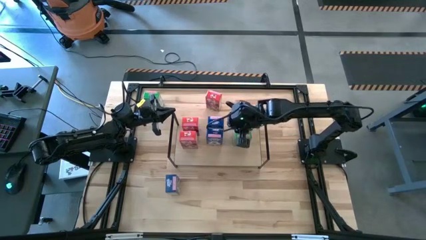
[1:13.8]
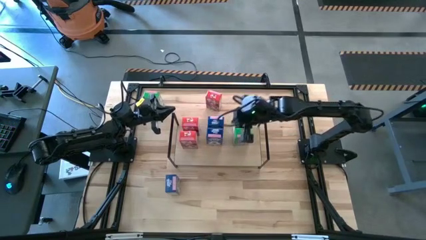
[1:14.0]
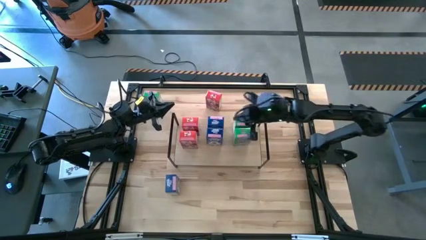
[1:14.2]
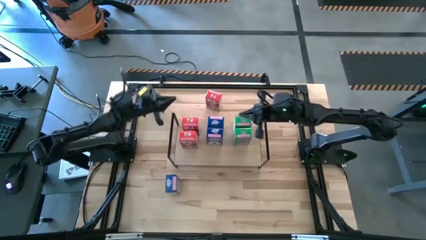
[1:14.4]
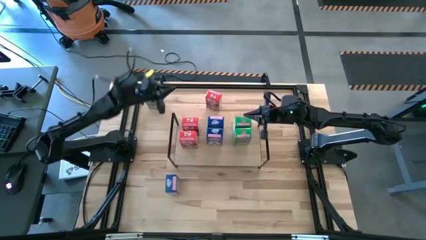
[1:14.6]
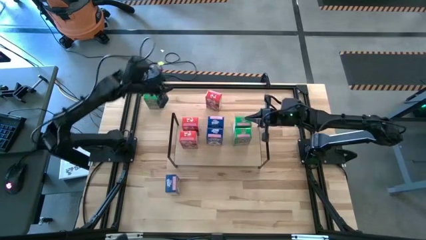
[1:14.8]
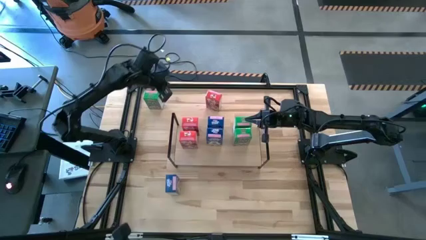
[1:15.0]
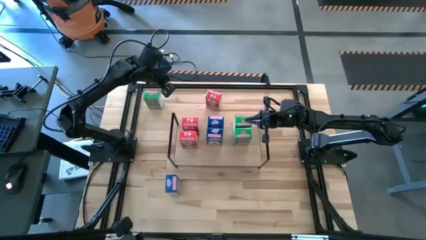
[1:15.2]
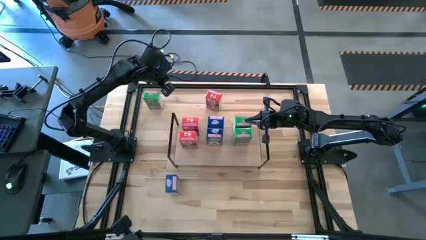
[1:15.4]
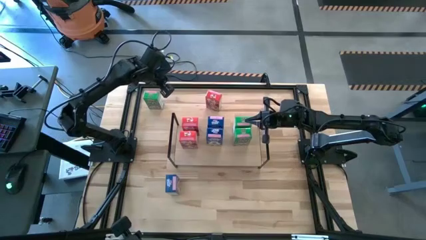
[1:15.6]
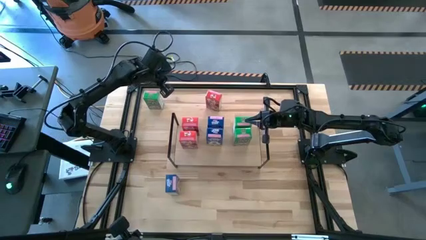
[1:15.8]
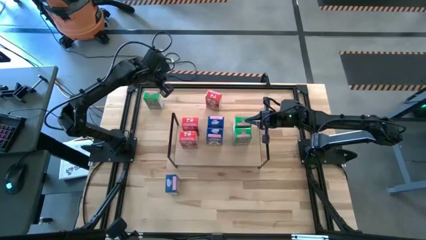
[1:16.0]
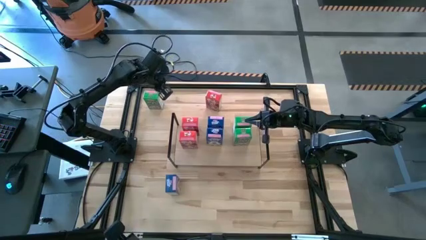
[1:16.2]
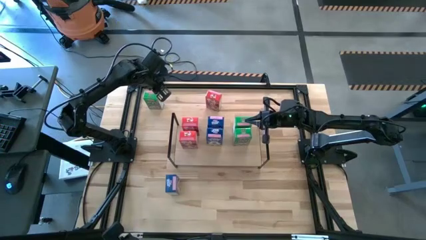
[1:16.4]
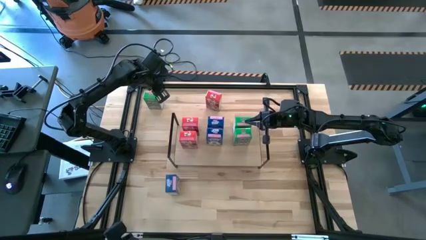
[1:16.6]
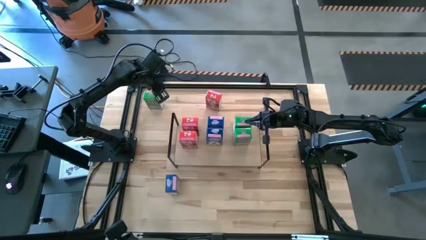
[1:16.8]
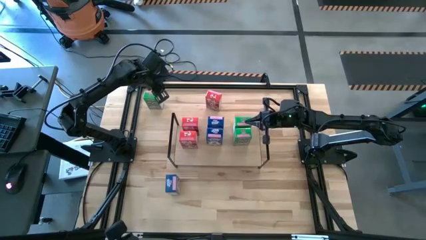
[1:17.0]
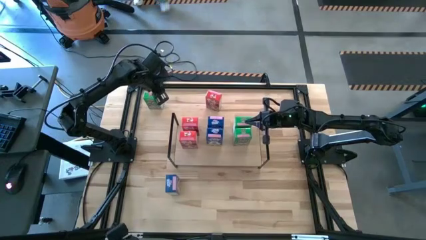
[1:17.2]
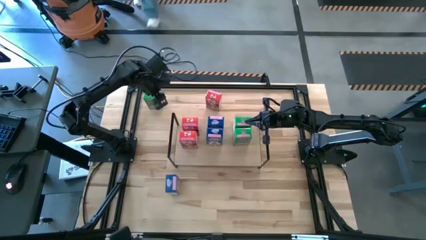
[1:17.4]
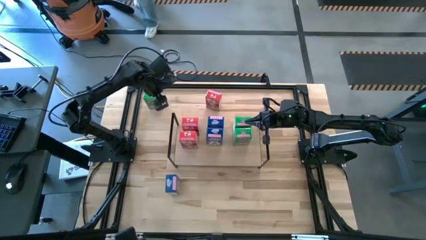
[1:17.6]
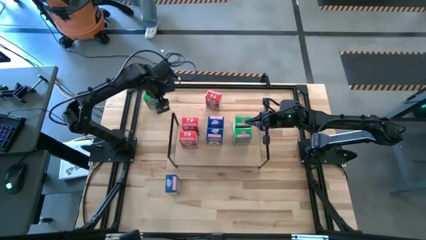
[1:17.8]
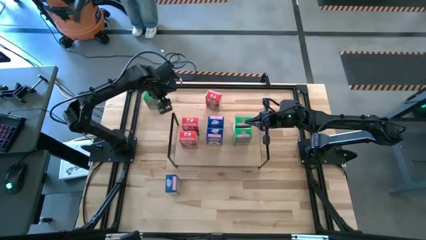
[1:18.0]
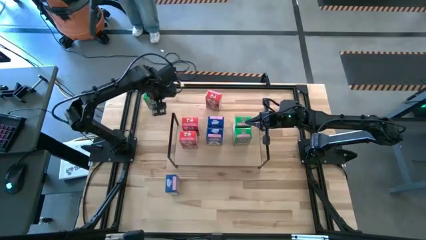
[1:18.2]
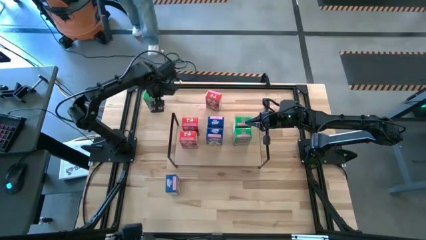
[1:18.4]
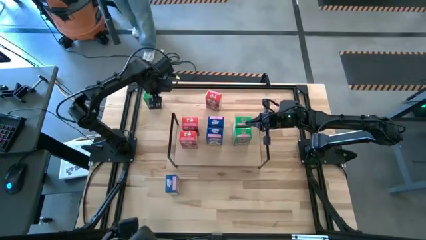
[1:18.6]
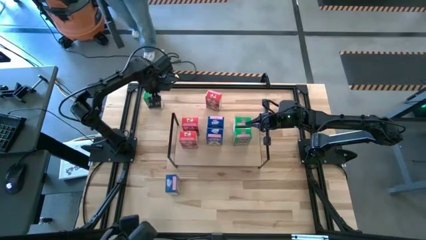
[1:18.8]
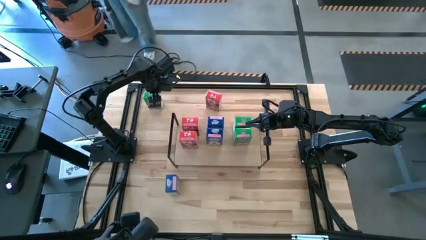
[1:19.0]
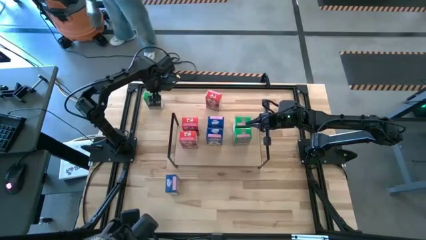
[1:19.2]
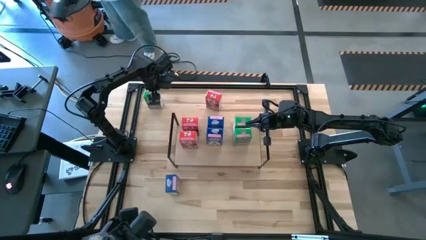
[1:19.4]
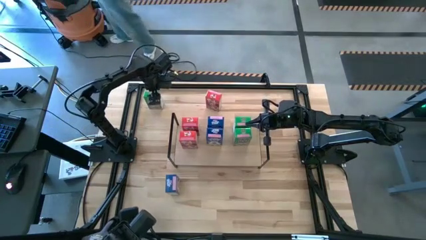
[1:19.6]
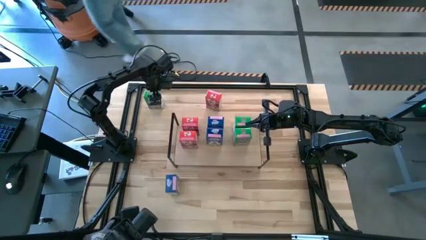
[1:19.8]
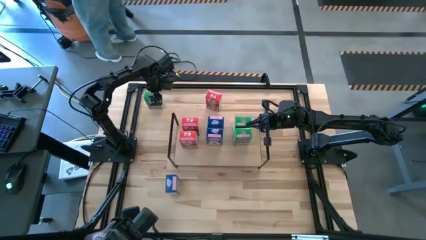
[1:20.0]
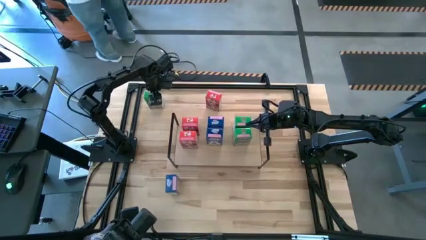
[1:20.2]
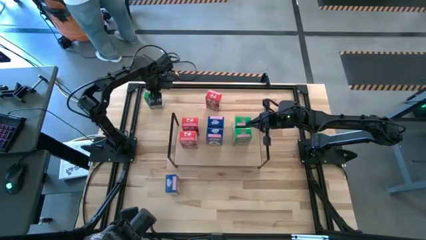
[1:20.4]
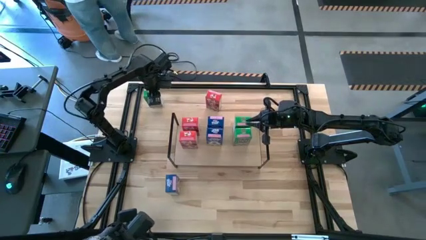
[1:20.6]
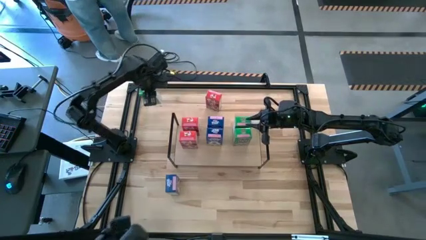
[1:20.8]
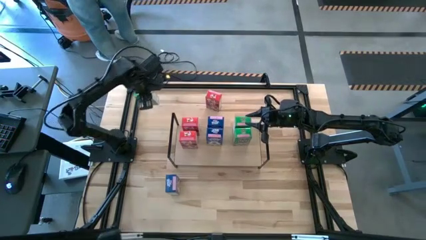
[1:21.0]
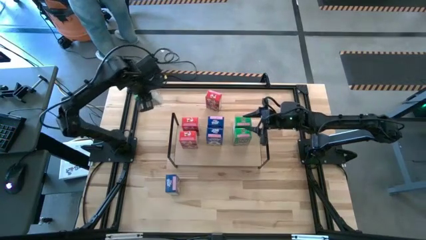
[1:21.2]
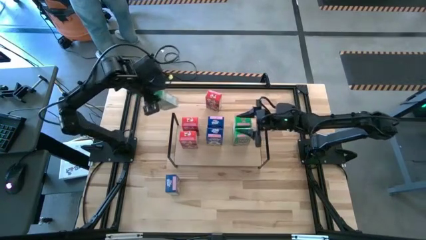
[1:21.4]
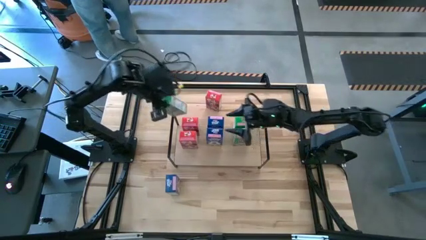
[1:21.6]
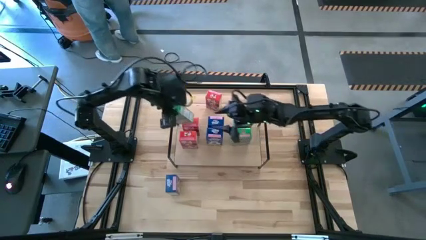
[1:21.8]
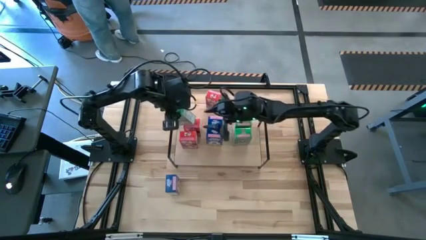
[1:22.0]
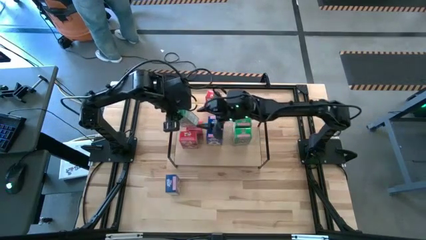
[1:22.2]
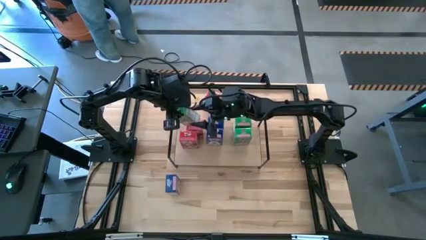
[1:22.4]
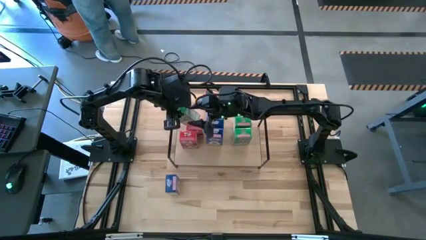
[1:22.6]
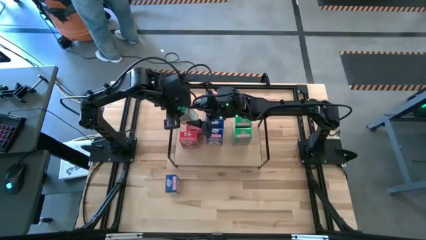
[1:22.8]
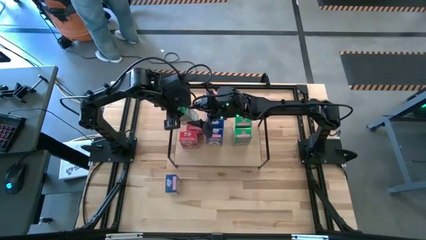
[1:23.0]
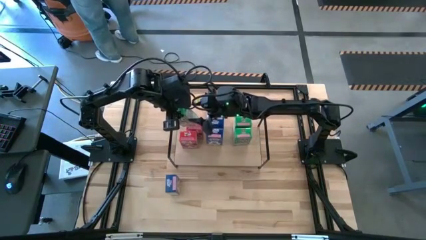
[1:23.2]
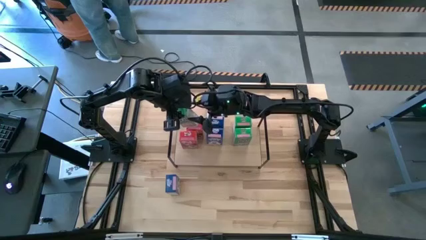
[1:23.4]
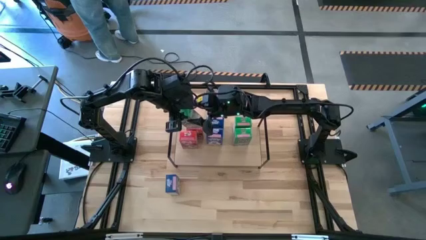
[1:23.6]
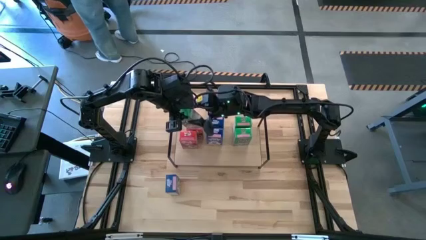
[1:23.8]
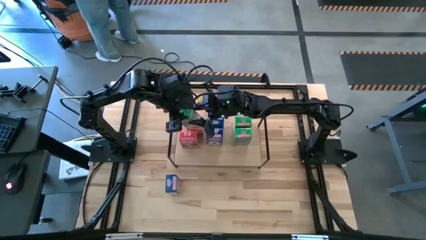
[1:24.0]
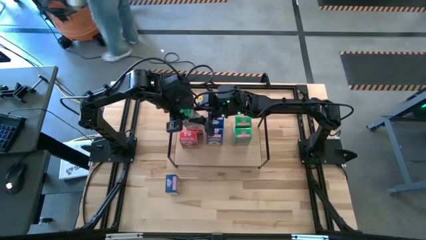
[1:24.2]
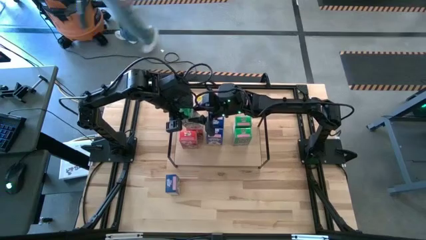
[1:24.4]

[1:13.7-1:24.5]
Task: Stack cereal on shelf
Put the green cereal box on the shelf aligned with the other green cereal boxes

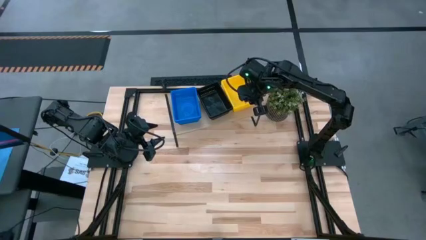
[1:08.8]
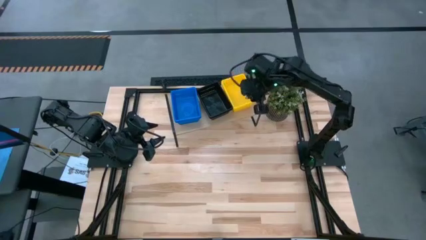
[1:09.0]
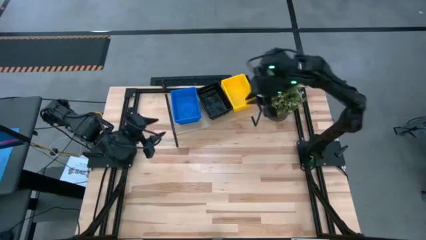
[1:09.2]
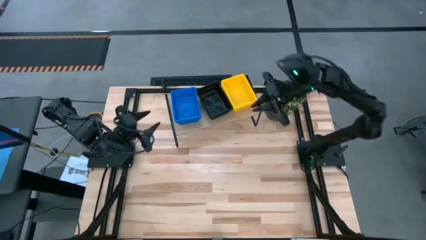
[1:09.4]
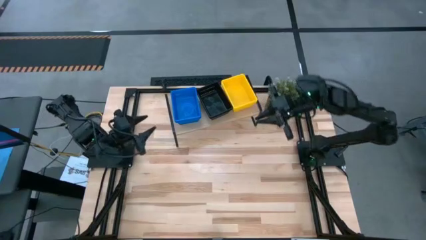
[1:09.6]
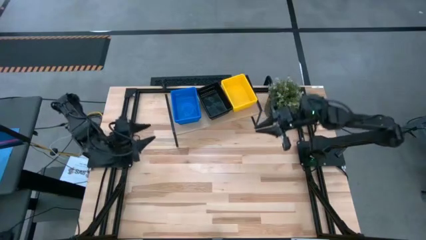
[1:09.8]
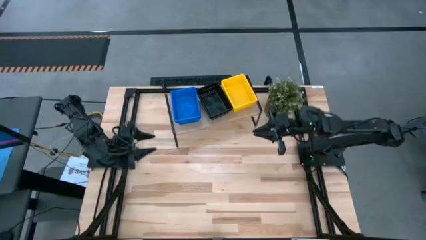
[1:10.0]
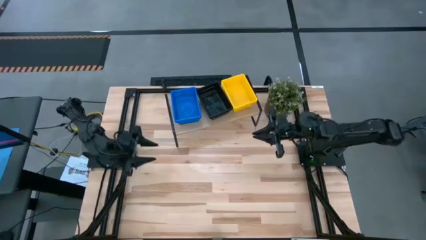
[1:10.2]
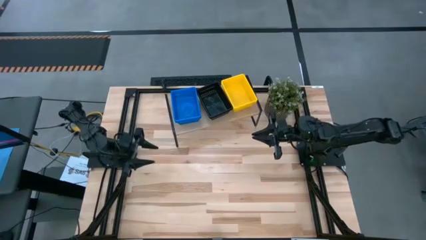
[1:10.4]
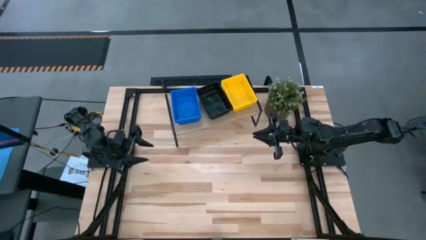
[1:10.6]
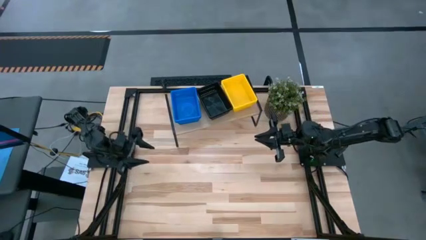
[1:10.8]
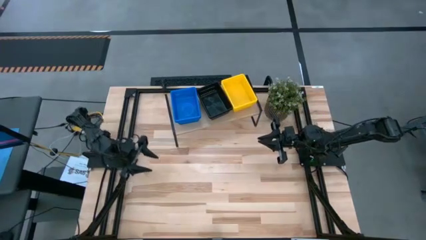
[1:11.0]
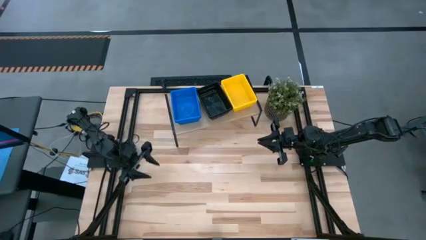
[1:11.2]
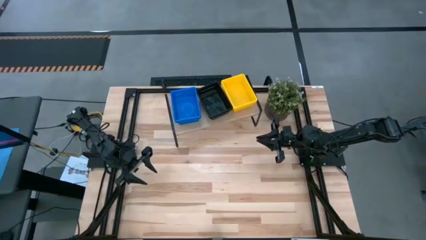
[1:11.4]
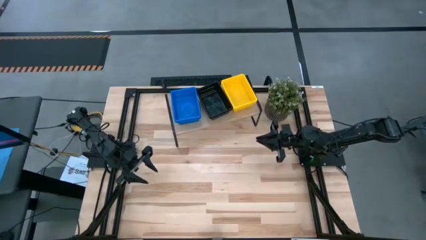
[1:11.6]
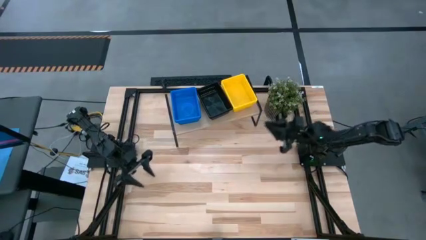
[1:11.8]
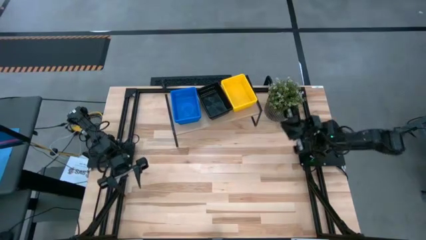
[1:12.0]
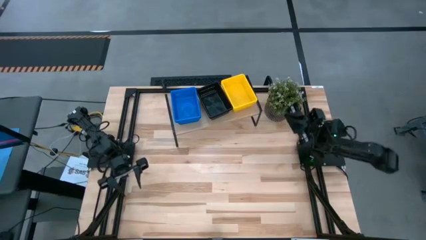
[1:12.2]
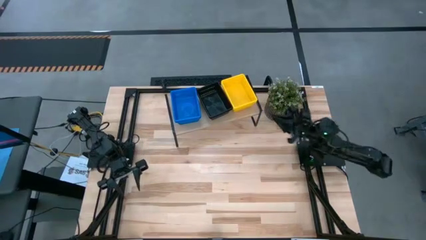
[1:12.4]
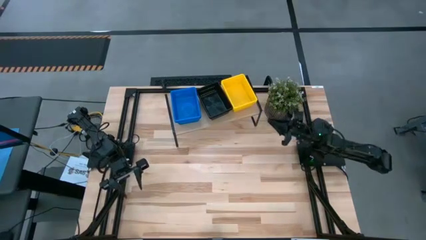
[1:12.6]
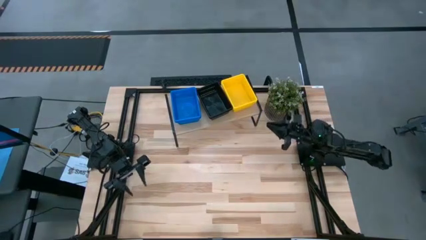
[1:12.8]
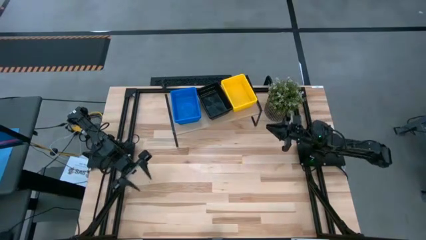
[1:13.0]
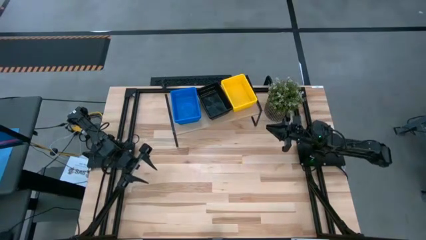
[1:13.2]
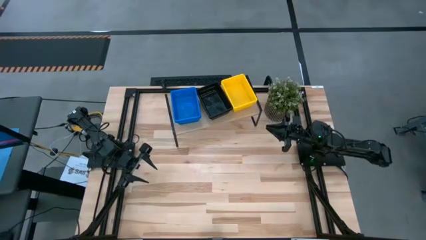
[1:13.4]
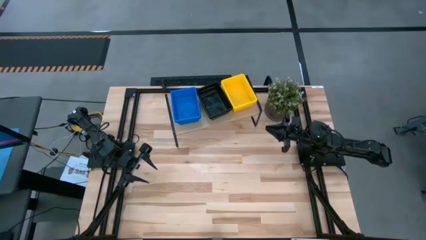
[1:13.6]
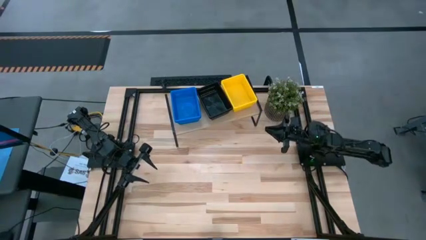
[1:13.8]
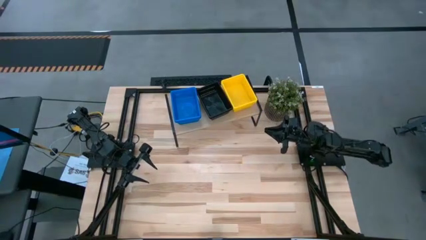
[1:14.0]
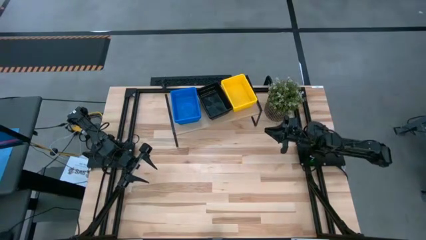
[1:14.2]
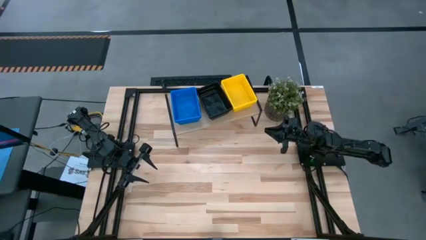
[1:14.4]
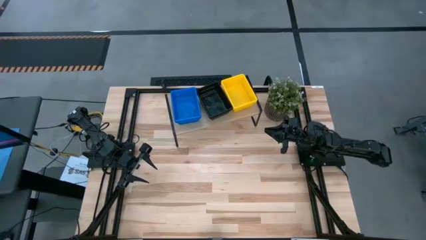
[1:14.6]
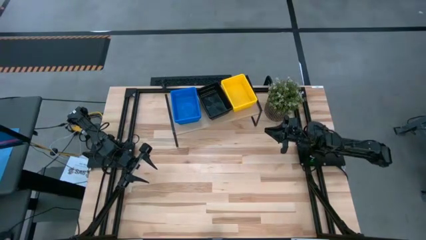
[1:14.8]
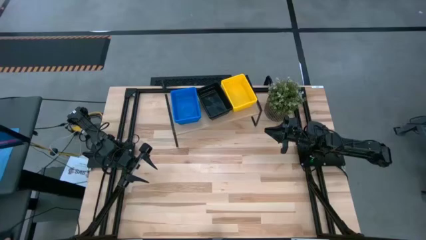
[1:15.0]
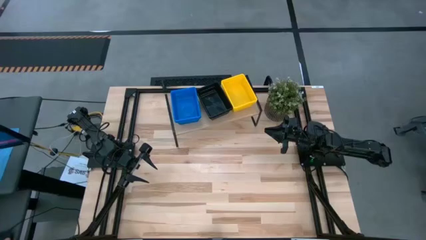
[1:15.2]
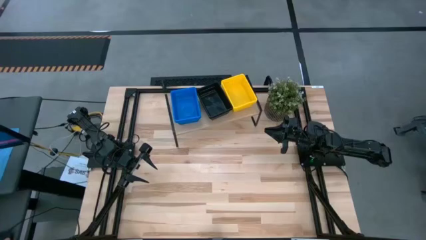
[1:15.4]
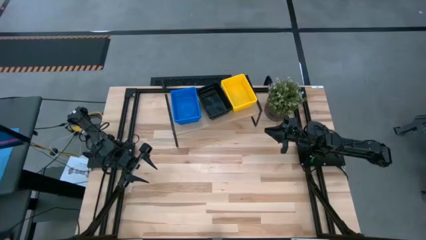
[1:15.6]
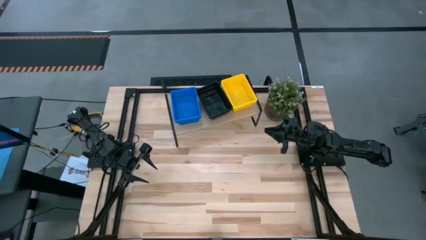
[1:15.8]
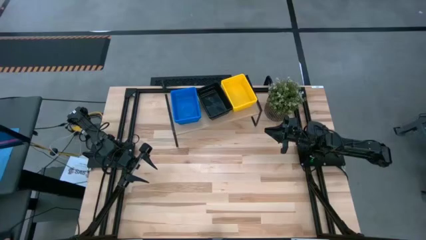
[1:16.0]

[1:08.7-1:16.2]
Task: Stack baskets on shelf by color
Return to Home Position
